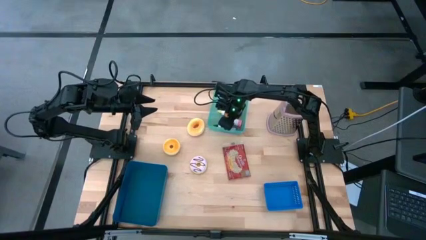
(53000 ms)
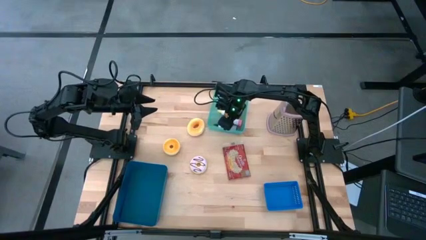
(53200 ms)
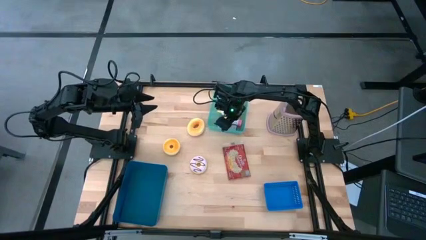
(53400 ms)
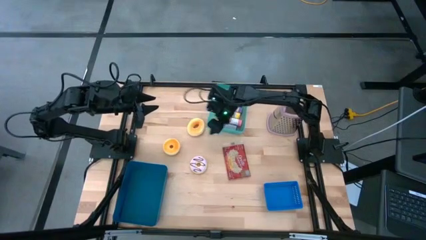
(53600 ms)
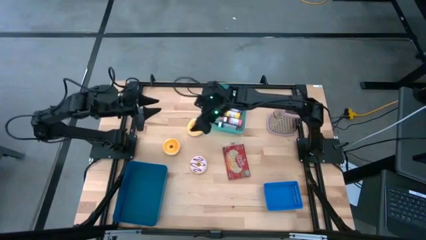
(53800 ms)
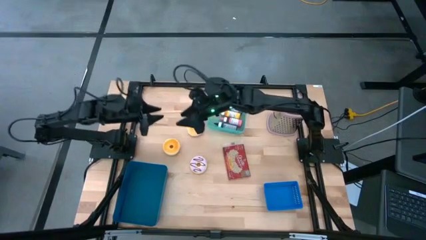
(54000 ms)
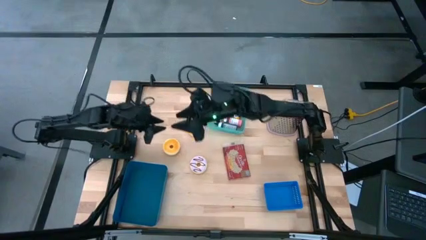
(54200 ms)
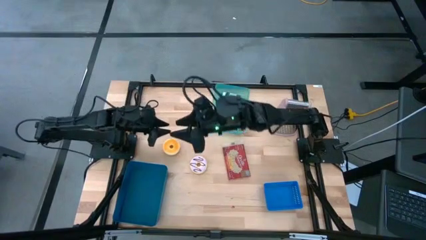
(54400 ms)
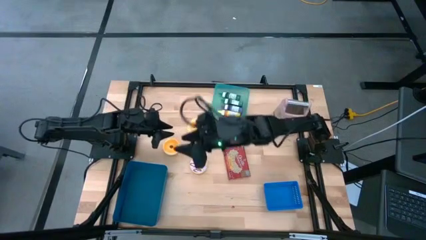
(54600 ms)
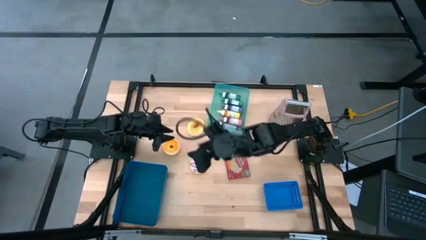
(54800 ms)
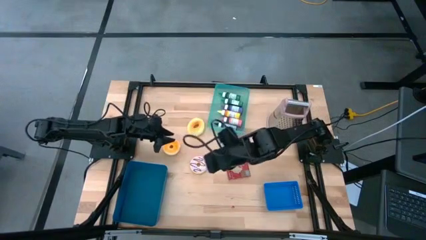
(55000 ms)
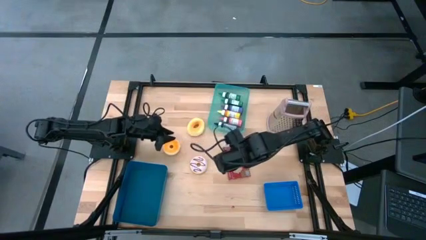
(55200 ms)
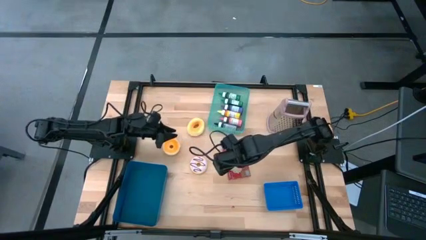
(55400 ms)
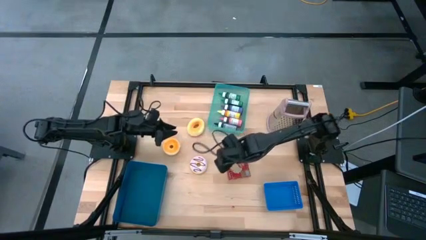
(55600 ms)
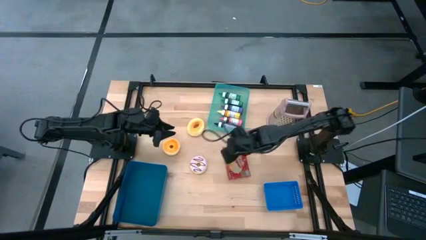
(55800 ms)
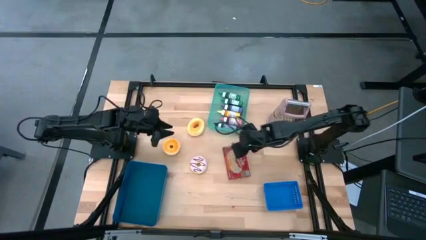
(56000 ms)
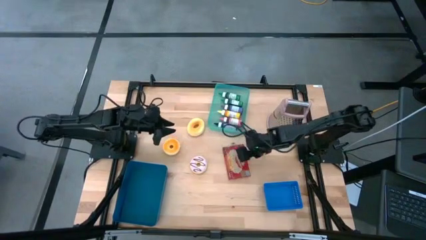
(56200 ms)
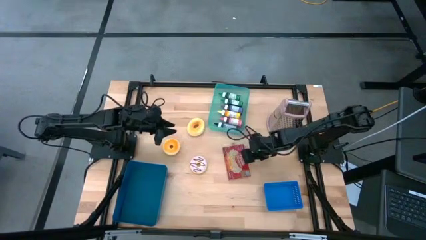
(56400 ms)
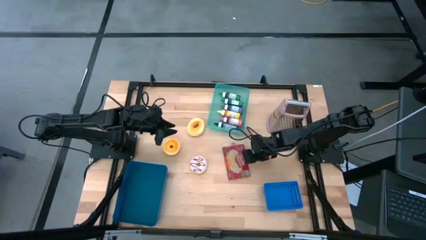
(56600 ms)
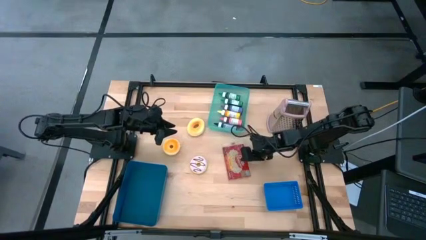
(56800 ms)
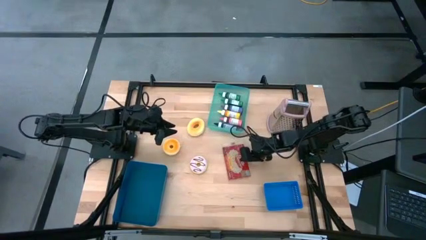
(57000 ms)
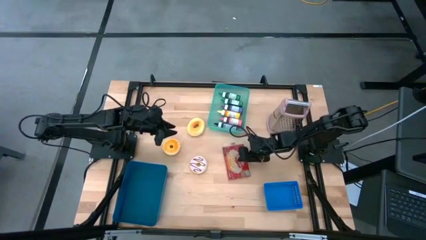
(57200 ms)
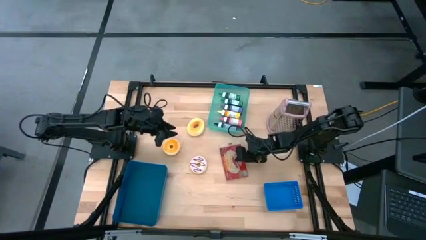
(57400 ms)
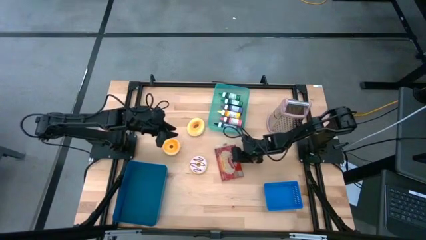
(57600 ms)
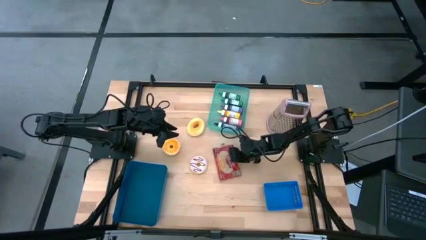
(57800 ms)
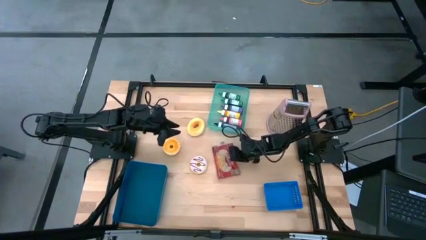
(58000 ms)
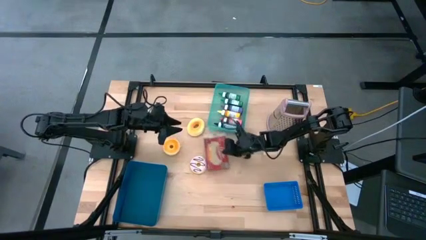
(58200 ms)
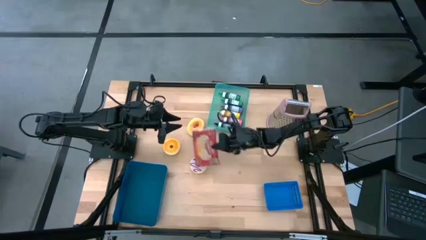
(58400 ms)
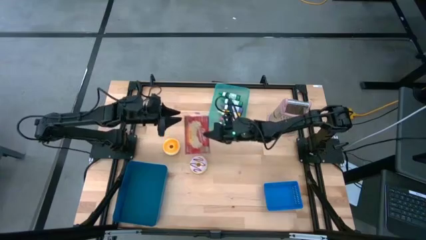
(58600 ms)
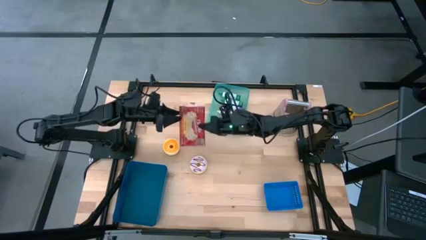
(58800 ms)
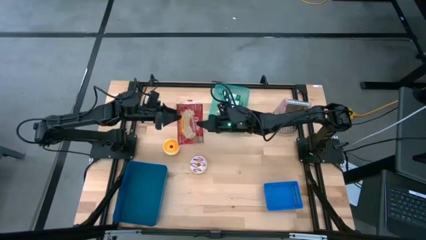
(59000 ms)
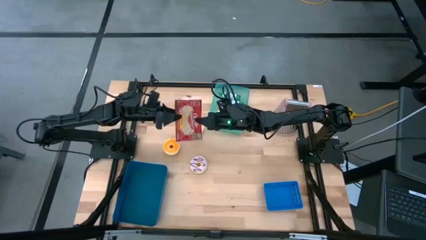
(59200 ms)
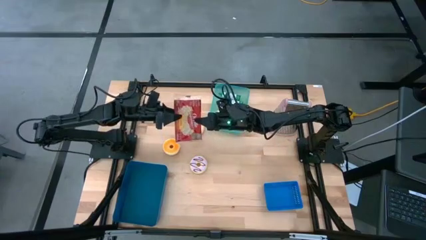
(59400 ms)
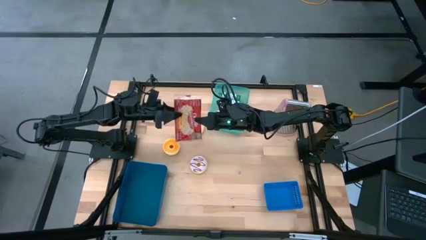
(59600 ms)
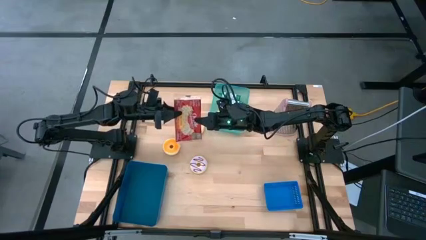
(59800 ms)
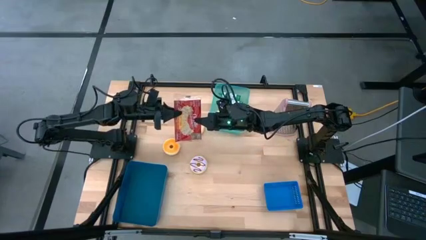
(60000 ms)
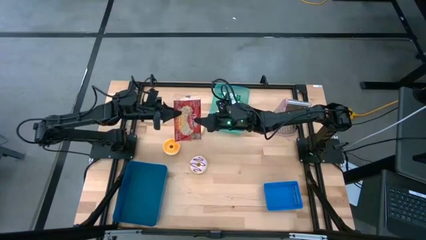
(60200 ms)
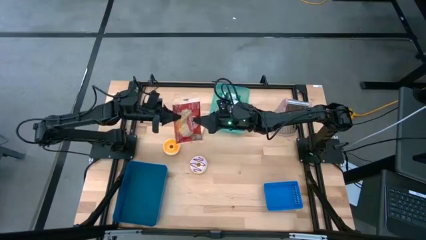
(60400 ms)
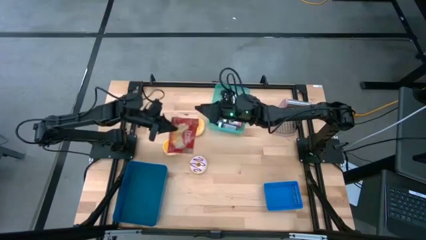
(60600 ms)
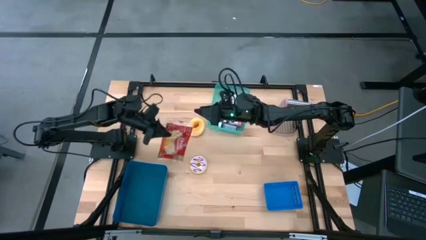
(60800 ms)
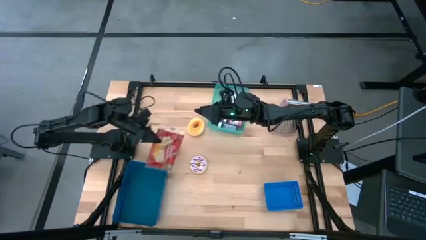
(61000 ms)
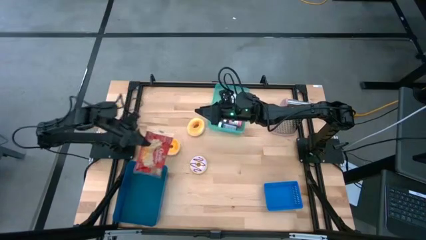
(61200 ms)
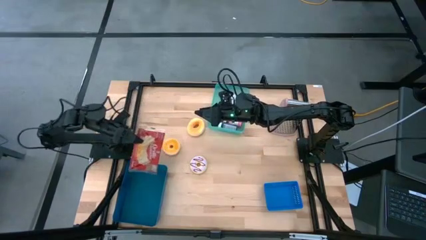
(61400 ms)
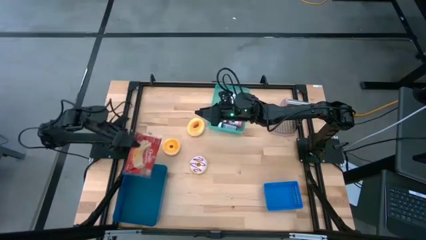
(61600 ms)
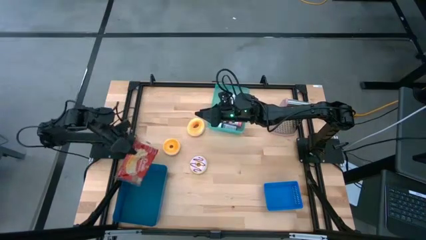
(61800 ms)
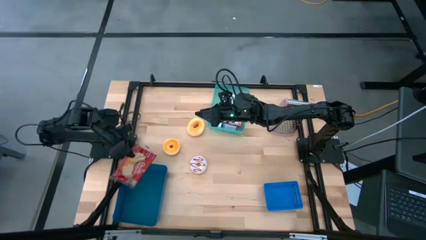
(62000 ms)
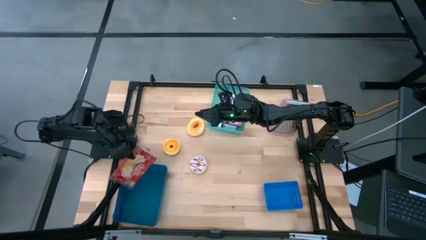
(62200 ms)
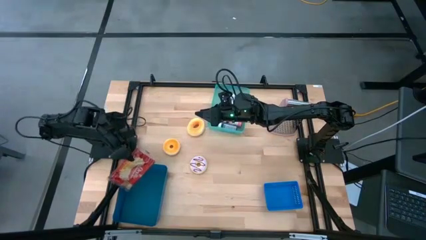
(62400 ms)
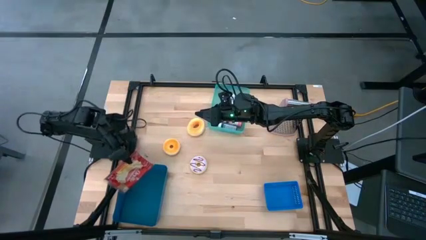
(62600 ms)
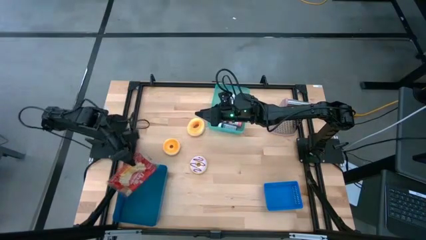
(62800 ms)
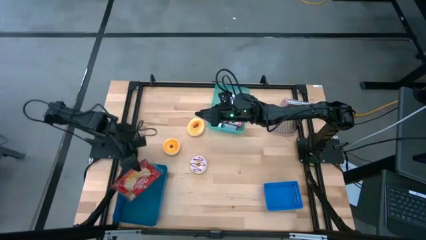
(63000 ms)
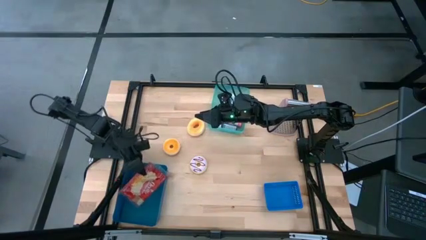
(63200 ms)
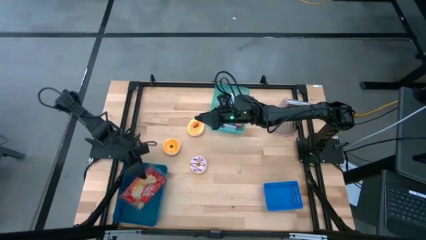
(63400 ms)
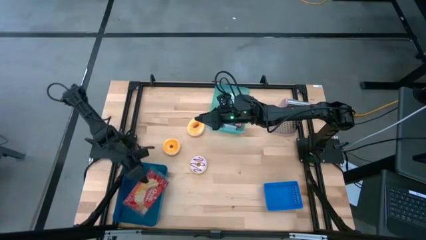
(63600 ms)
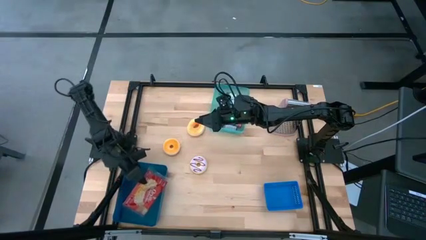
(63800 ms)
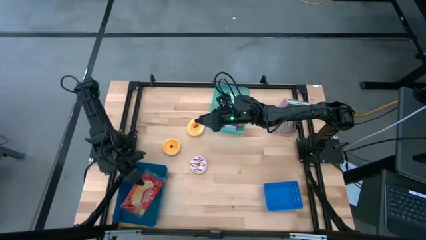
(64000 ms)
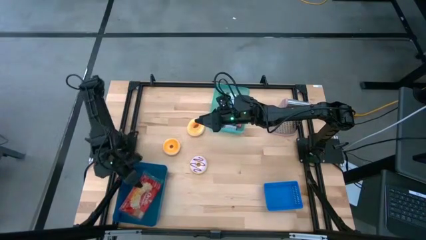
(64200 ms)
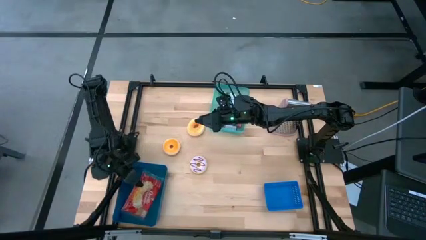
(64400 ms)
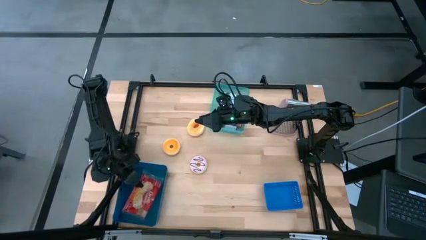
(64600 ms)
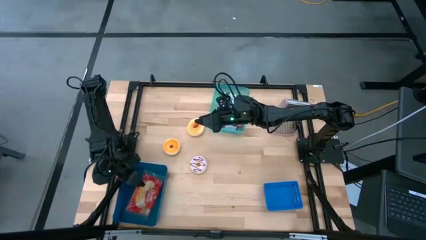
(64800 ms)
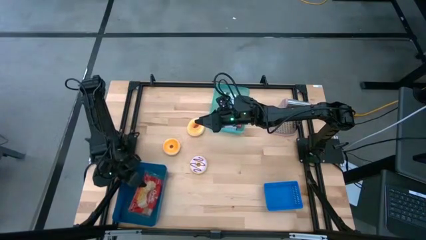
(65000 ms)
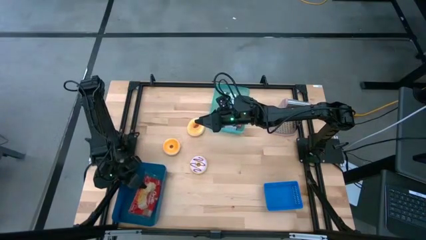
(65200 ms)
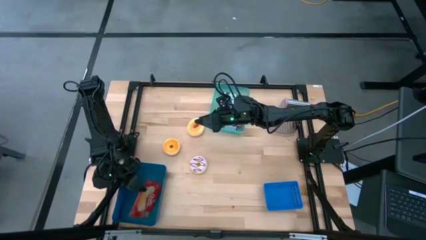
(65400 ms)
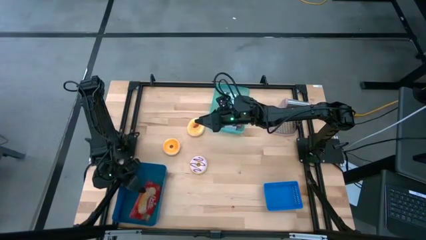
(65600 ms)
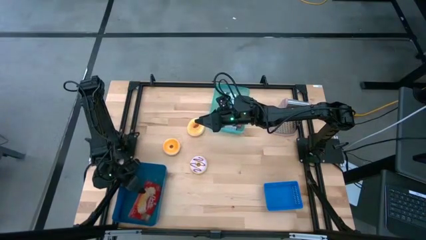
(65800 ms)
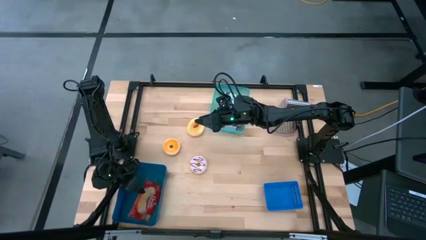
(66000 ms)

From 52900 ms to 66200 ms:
Put the red popcorn bag into the dark blue bin

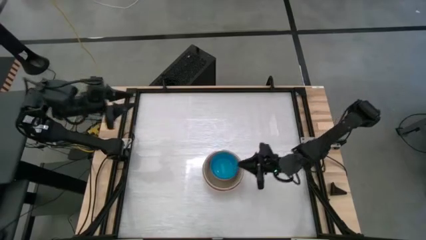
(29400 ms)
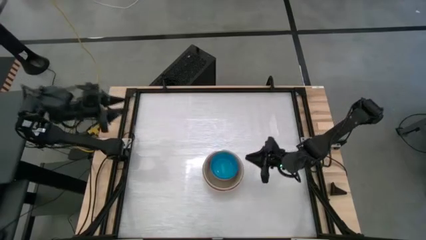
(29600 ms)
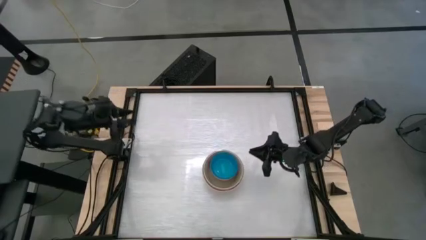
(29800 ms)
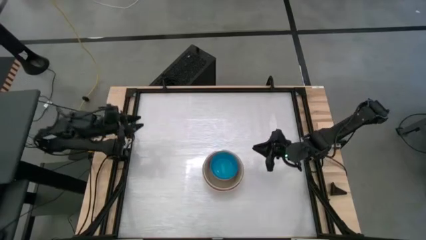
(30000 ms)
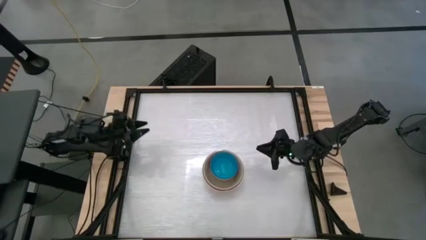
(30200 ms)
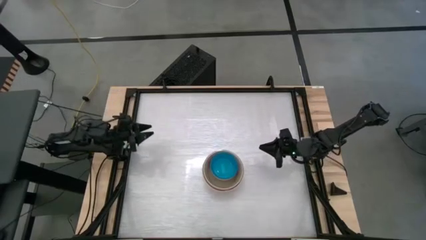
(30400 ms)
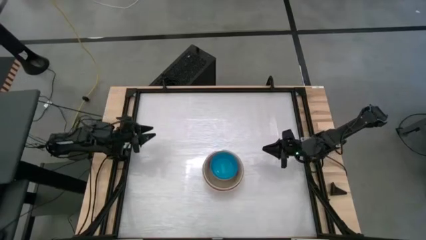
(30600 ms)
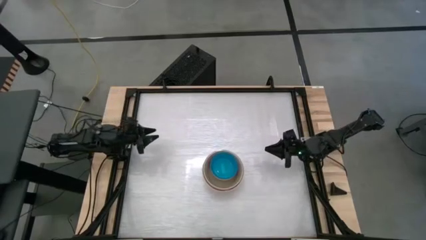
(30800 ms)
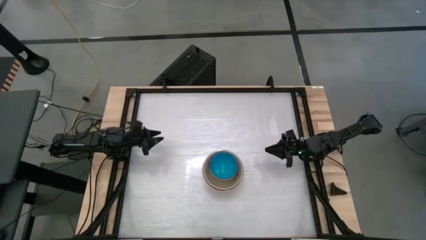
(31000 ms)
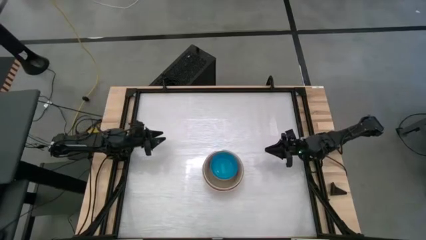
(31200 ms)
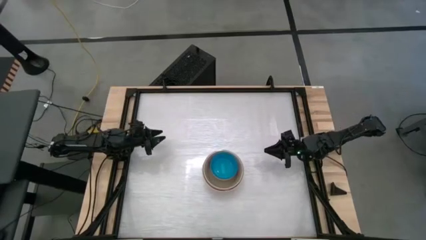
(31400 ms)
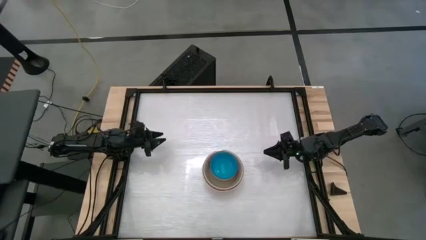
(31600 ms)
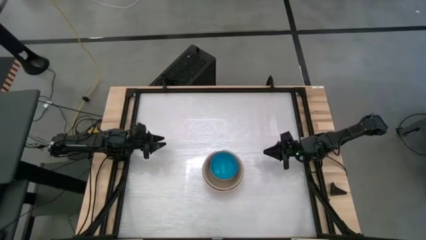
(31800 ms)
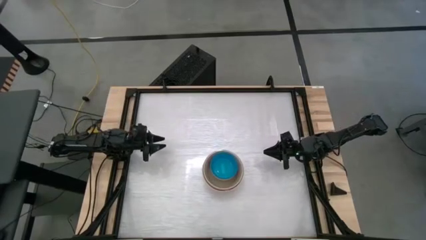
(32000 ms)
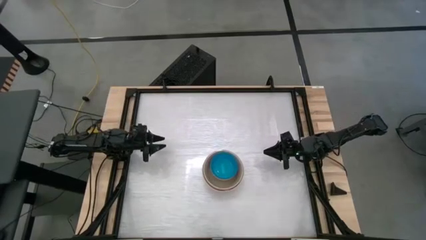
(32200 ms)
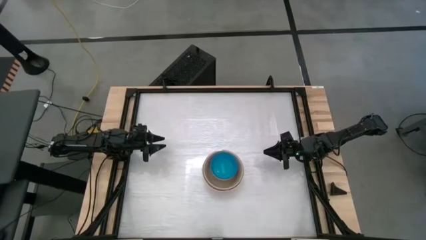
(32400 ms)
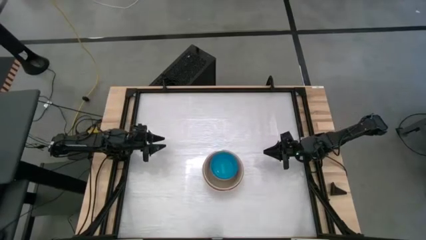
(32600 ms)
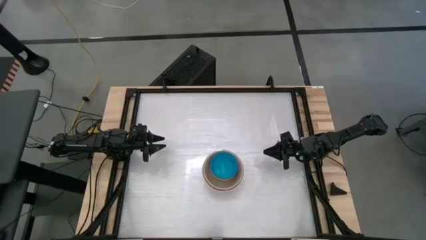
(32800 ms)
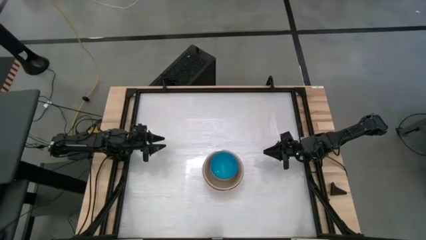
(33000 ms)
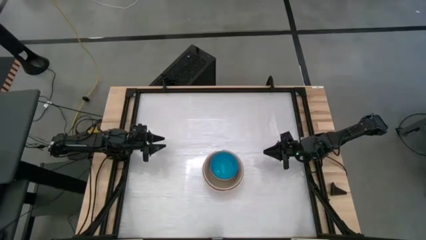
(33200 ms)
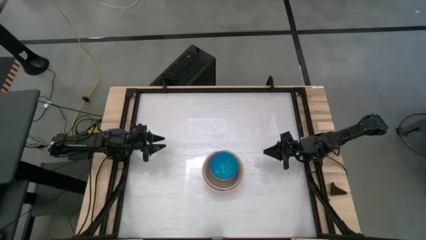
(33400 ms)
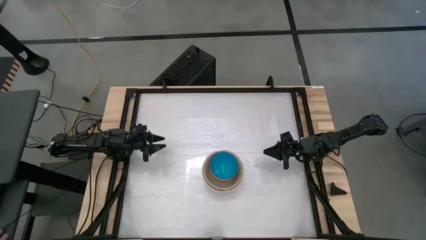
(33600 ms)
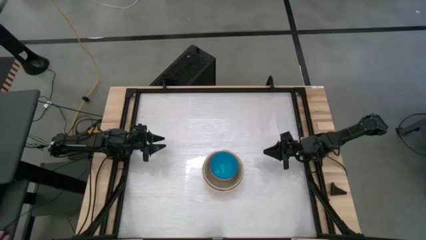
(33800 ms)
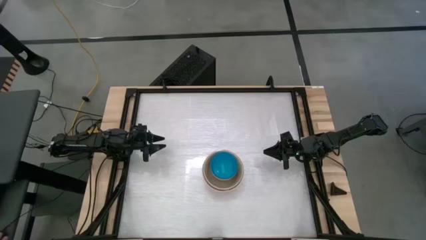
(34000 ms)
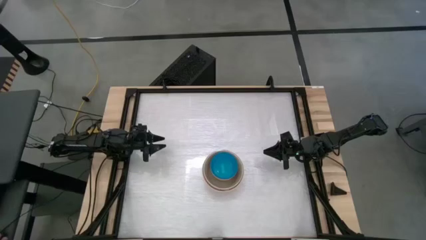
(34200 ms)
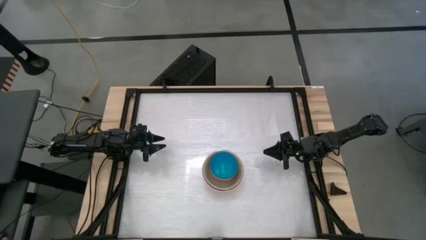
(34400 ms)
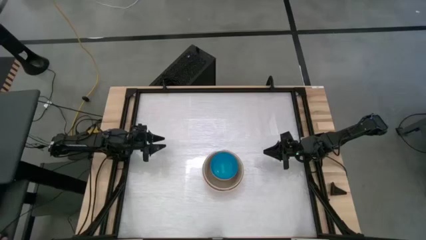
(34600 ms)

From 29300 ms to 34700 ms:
Return to Home Position
